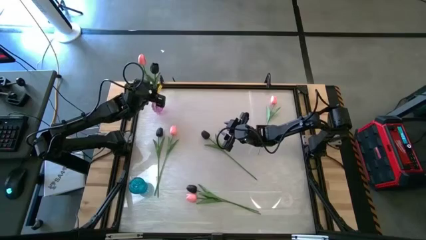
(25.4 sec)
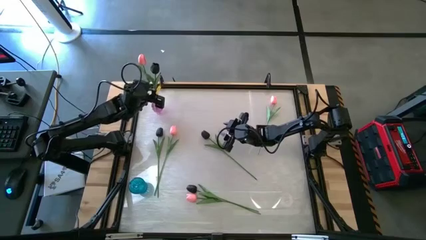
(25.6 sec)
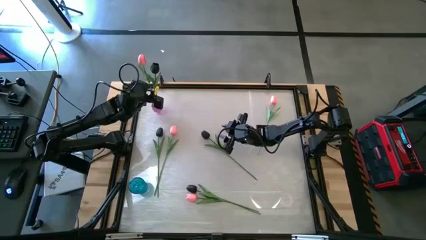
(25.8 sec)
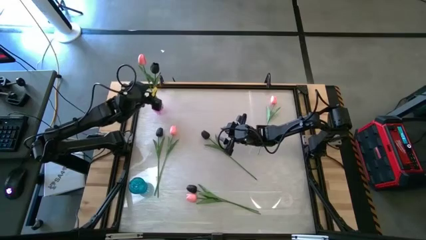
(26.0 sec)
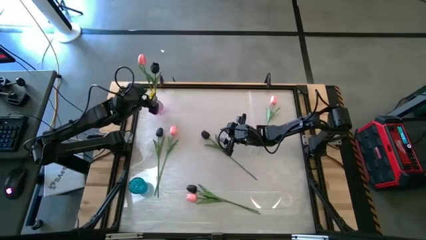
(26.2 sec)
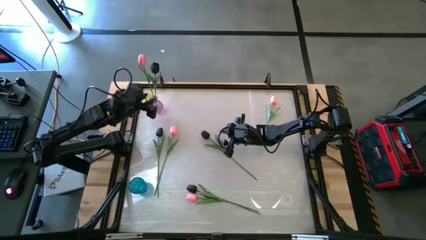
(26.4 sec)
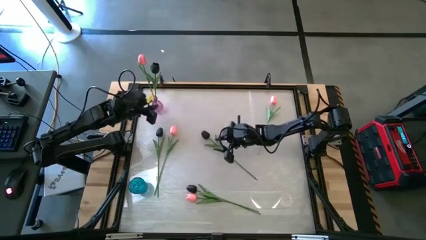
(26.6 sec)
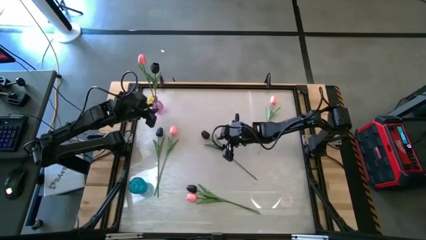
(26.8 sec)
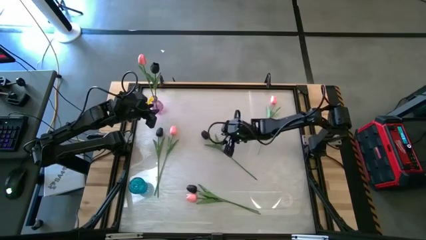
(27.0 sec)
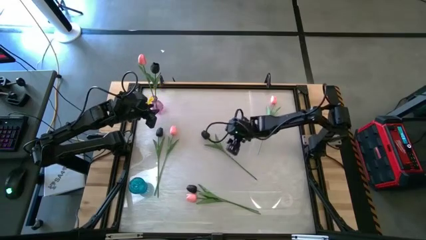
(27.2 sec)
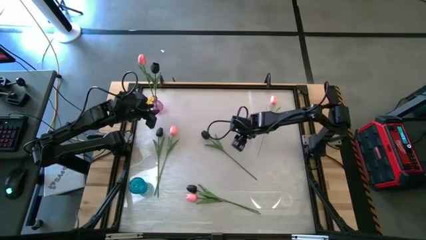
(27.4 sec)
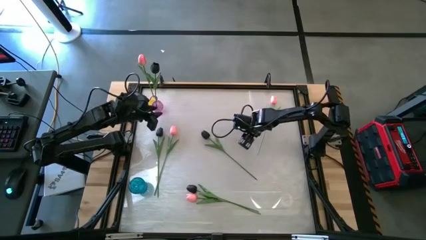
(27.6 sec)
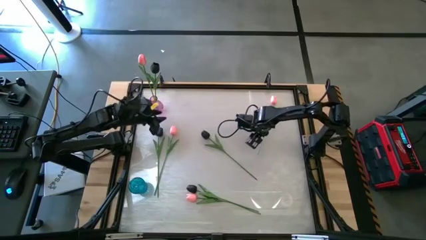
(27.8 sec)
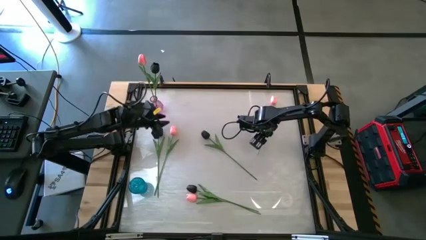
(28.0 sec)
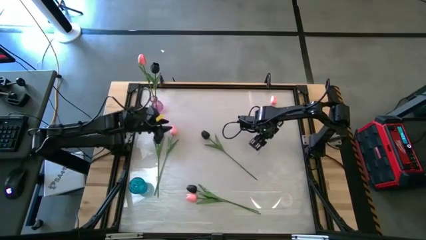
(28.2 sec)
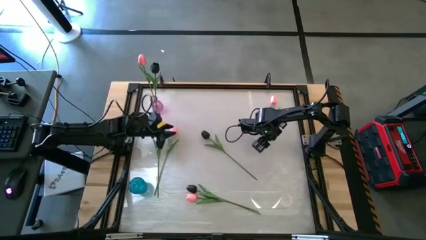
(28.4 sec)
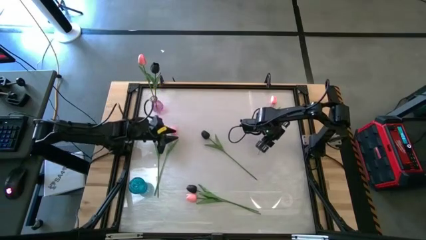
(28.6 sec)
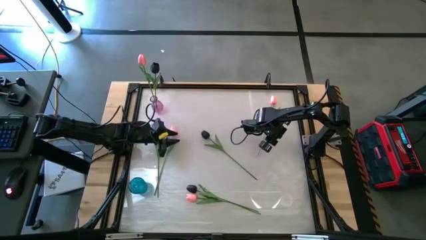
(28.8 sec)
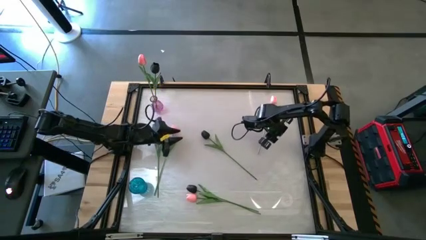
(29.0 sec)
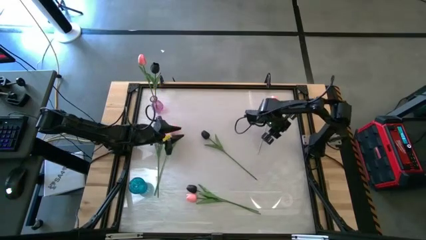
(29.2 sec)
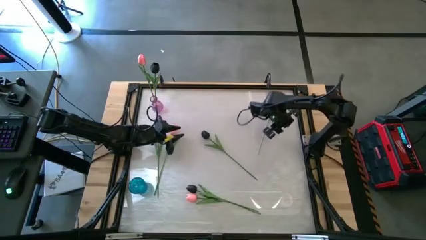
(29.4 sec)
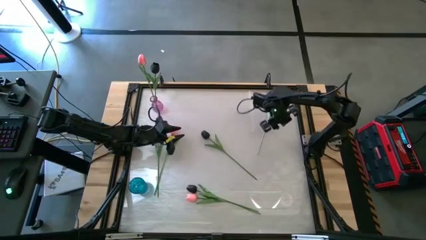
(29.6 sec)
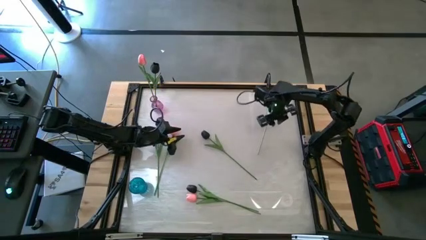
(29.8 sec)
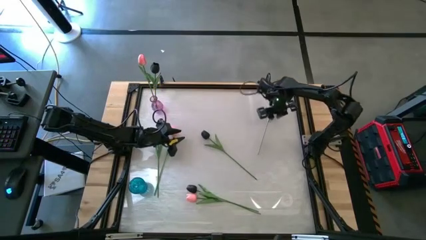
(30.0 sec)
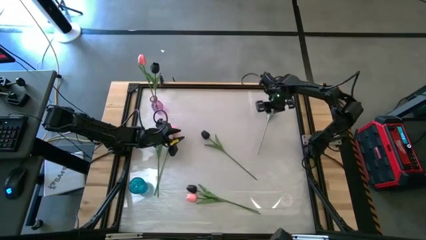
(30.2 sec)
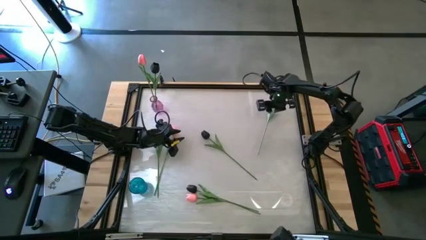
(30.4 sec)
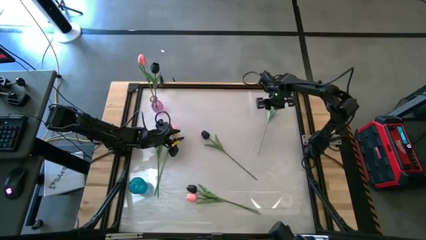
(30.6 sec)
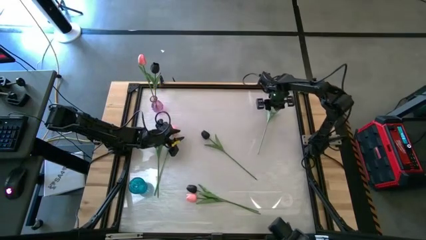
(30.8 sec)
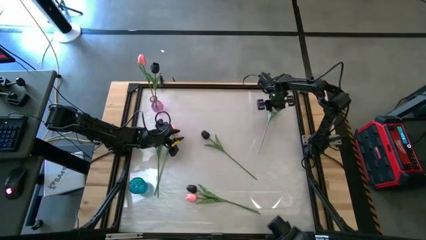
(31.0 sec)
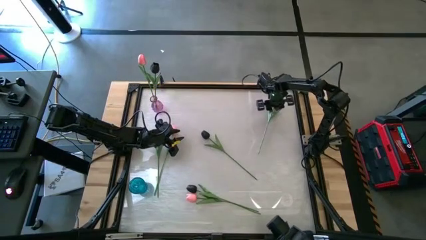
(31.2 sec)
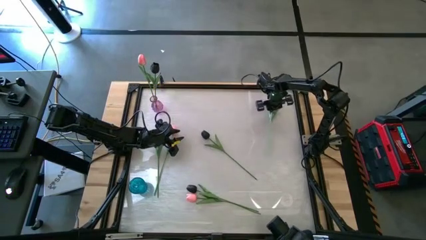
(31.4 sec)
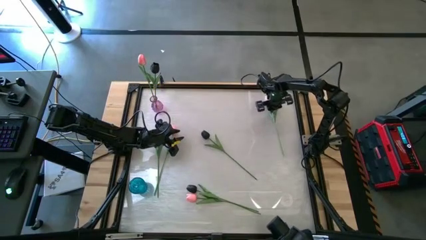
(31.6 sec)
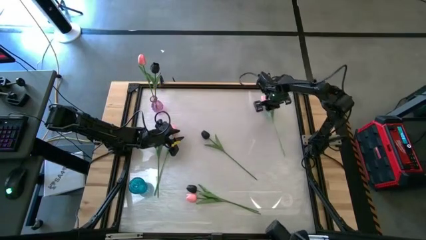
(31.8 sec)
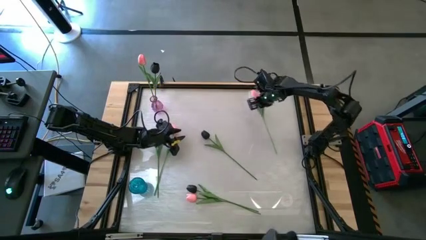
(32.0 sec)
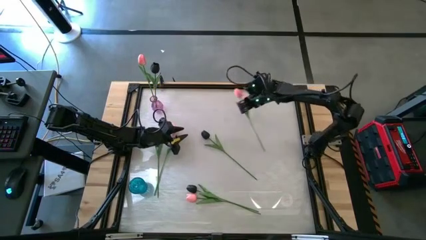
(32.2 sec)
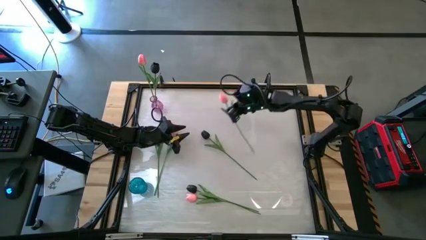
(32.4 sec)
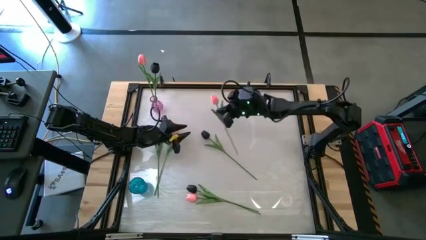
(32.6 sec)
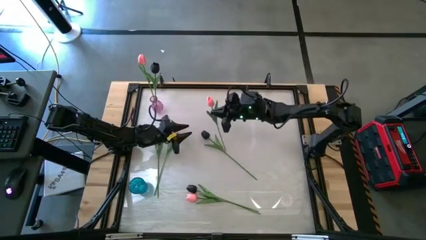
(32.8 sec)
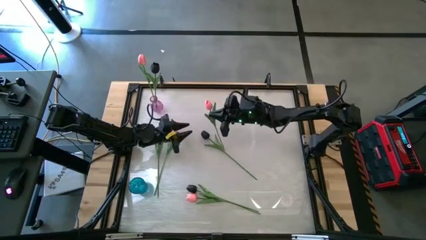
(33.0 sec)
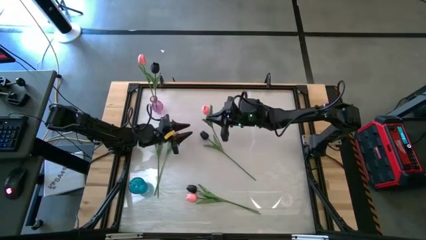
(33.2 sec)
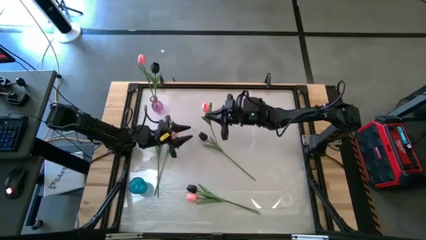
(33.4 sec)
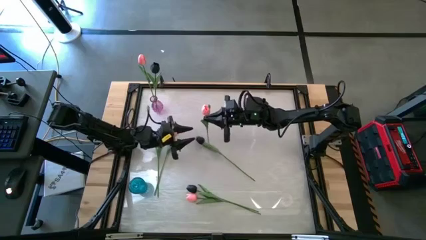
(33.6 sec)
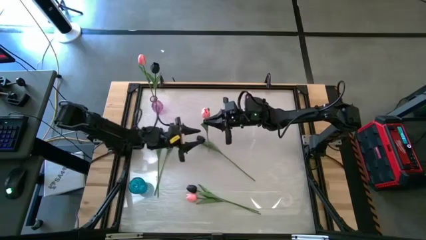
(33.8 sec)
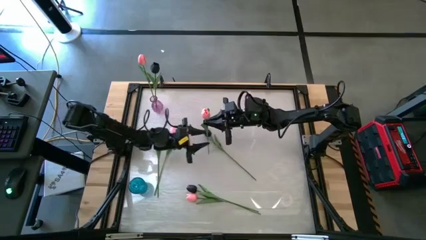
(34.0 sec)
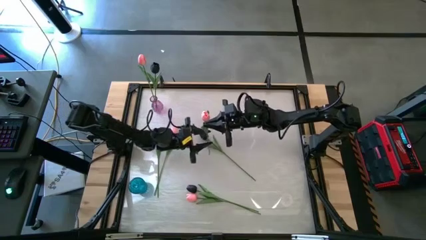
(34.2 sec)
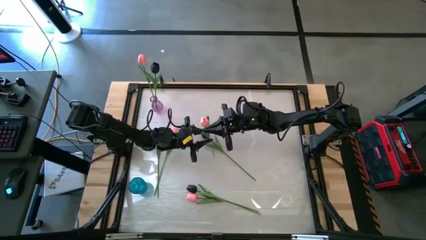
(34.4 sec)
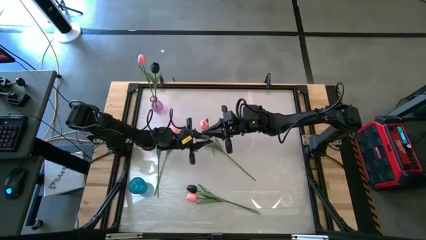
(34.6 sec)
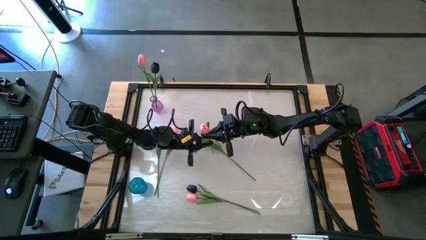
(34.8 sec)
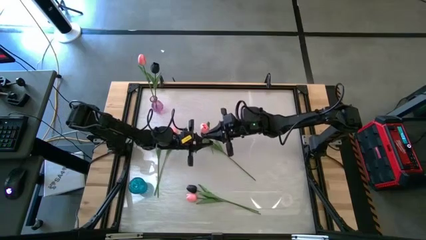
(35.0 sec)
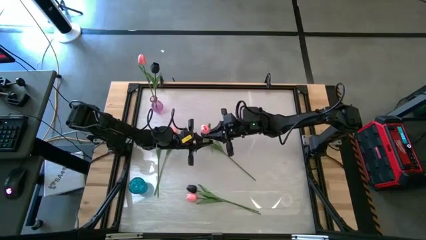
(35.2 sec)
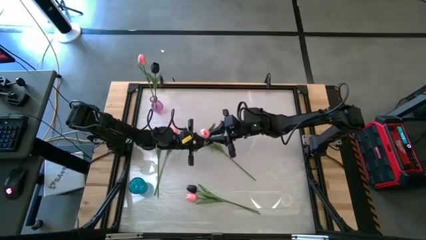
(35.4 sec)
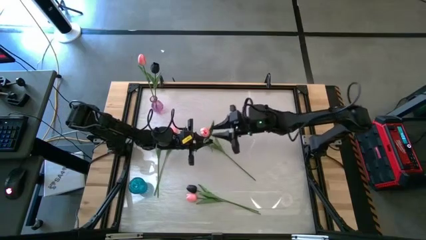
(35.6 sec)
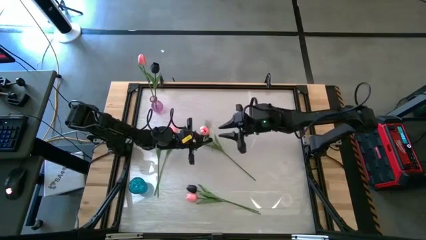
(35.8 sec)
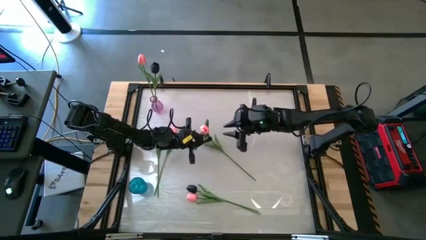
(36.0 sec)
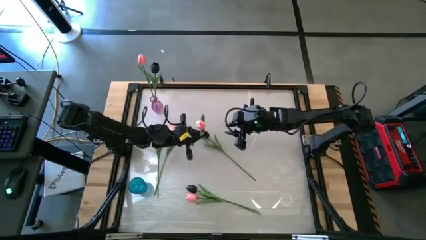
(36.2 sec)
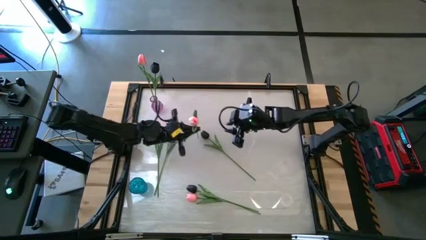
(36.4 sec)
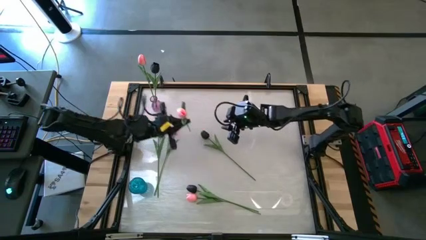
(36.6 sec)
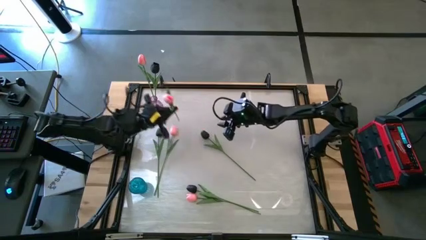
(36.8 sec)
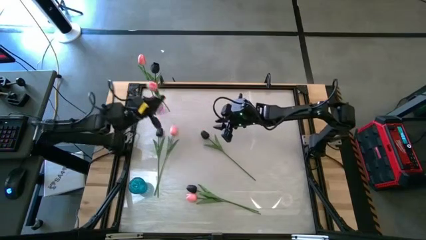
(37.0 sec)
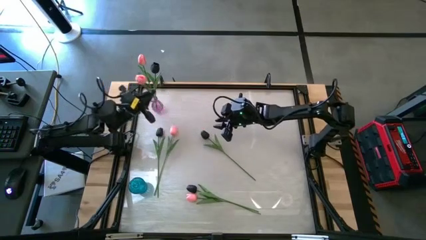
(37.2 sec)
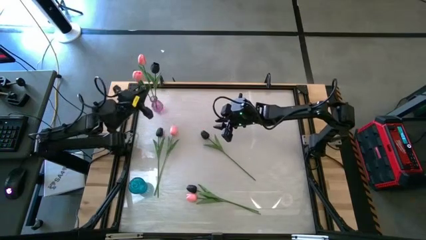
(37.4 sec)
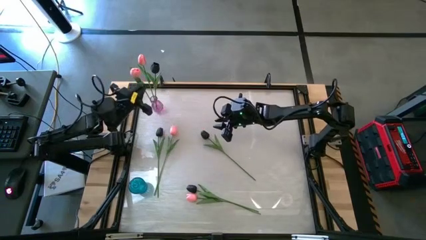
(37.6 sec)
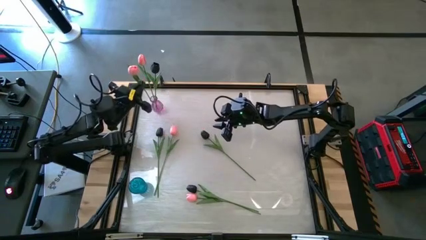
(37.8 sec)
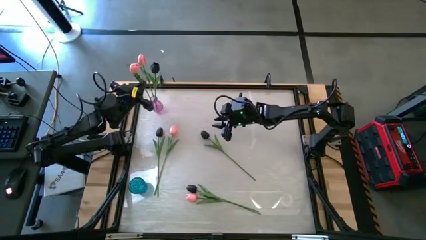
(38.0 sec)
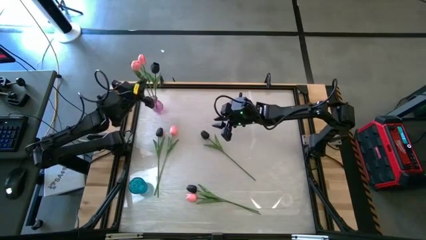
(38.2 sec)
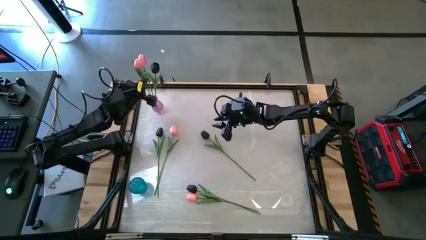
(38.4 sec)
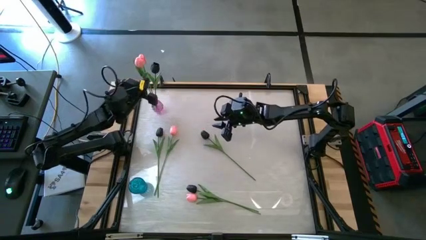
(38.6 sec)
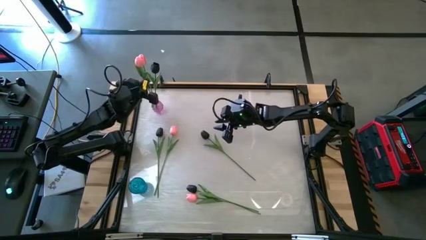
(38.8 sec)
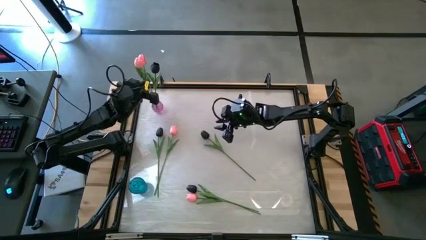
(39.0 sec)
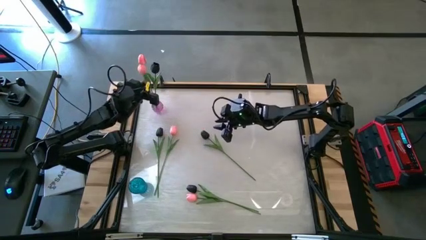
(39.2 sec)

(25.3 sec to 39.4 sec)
Task: Sort flowers into vase by color
Put pink flower into the purple glass vase
